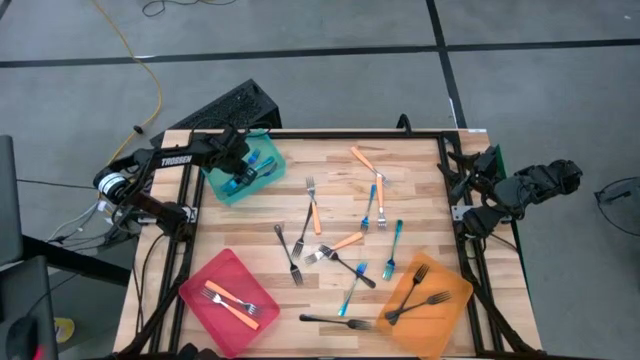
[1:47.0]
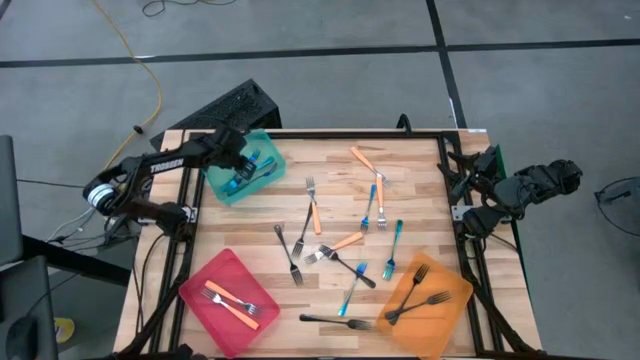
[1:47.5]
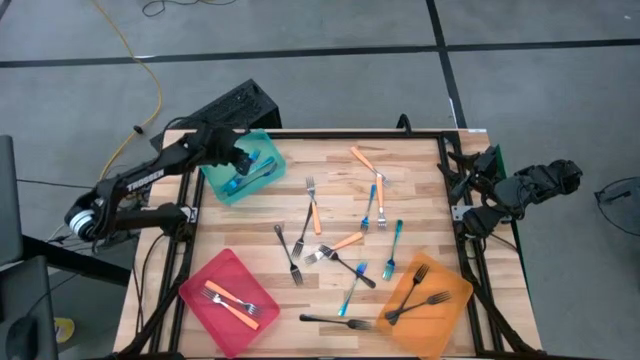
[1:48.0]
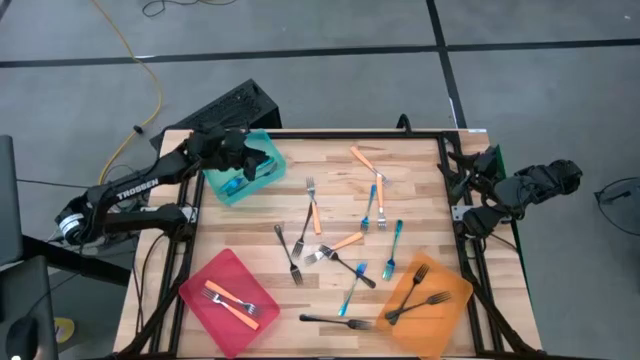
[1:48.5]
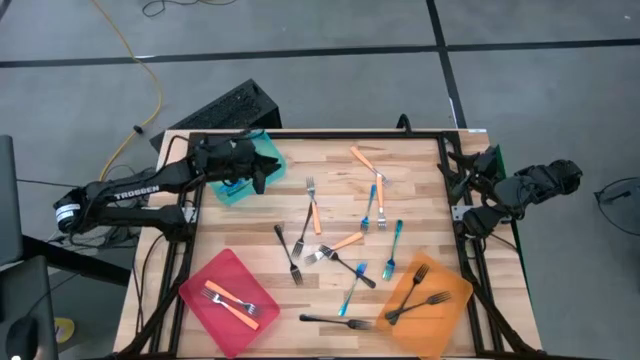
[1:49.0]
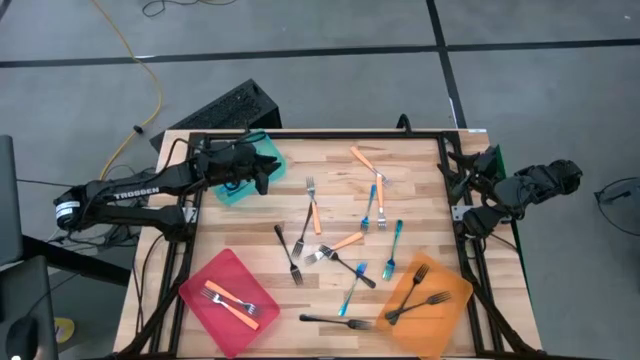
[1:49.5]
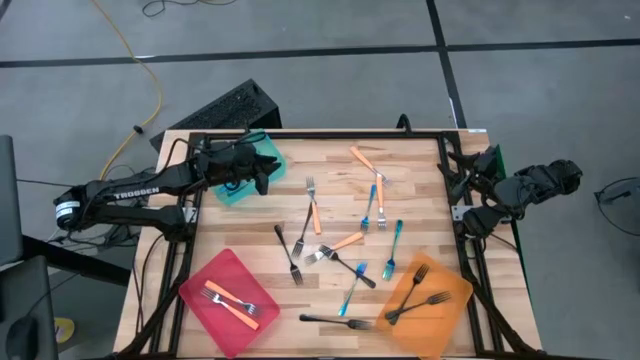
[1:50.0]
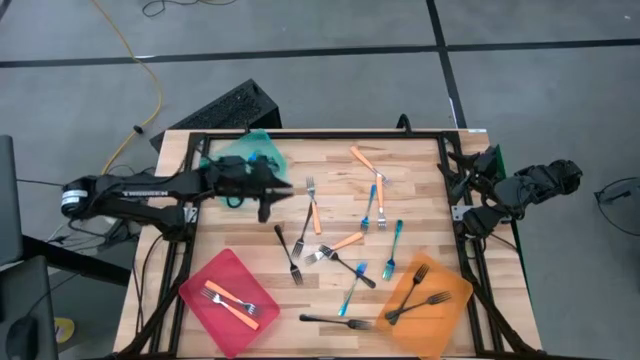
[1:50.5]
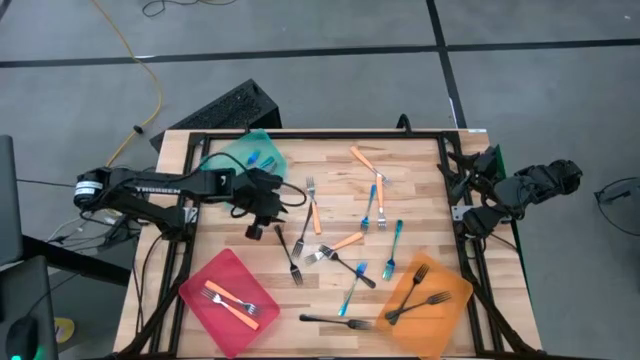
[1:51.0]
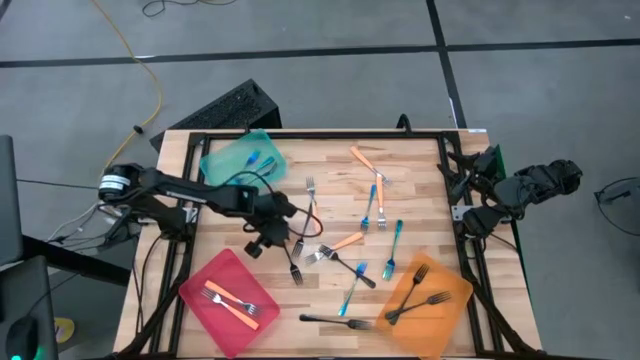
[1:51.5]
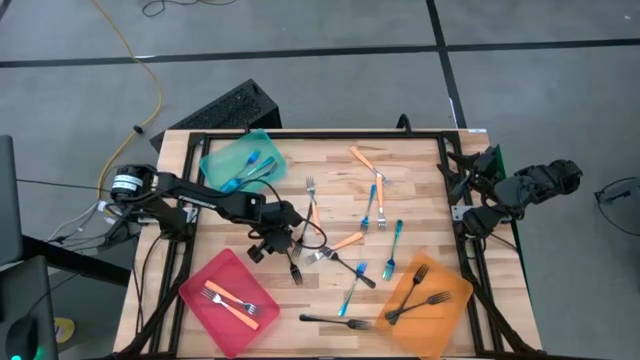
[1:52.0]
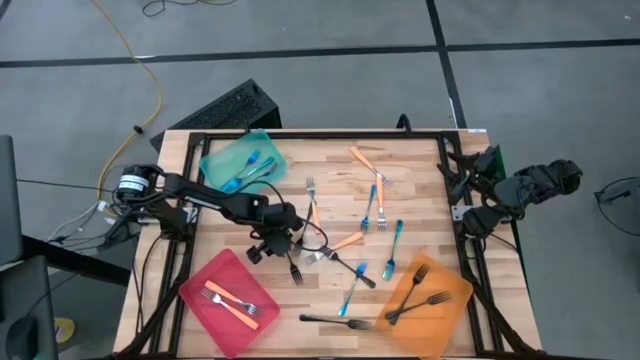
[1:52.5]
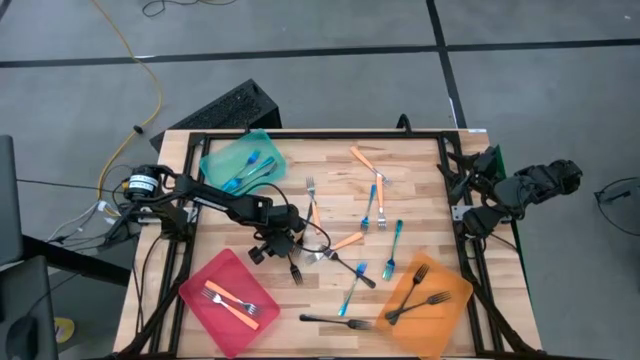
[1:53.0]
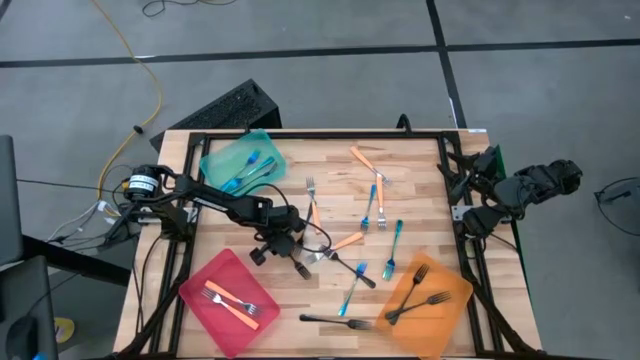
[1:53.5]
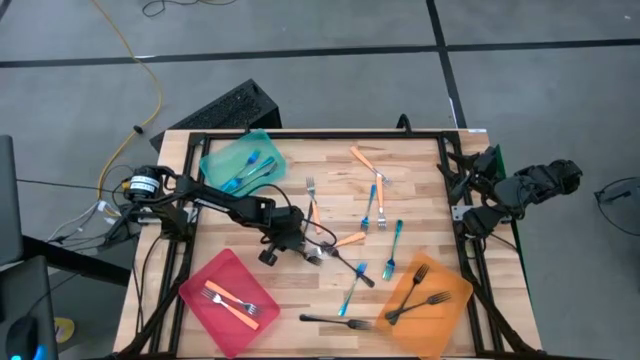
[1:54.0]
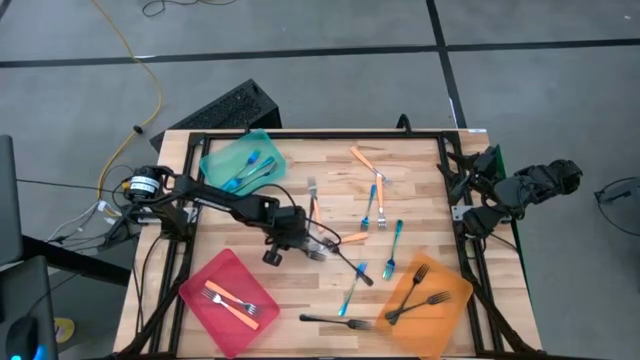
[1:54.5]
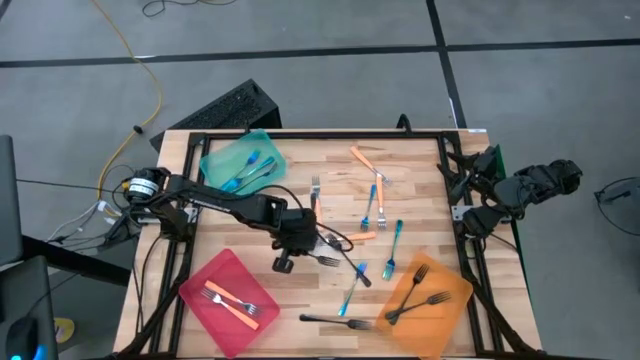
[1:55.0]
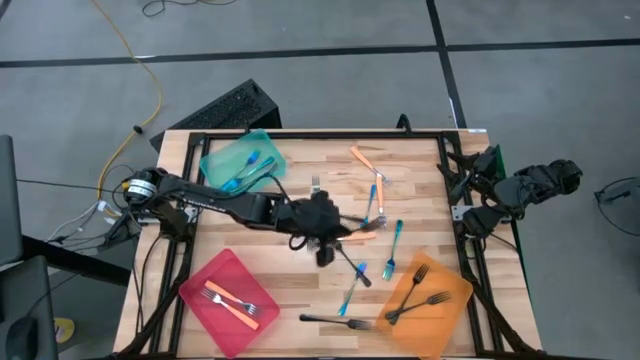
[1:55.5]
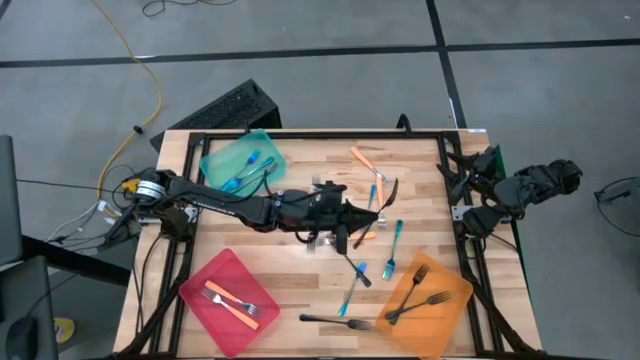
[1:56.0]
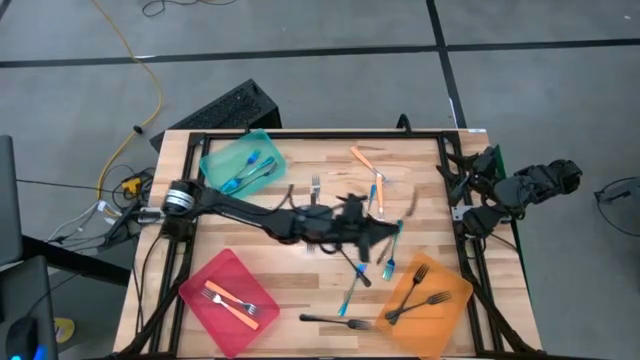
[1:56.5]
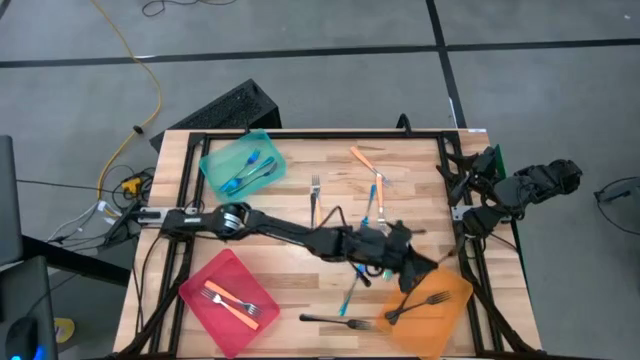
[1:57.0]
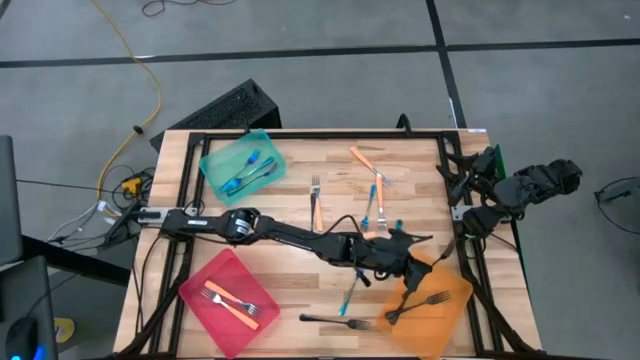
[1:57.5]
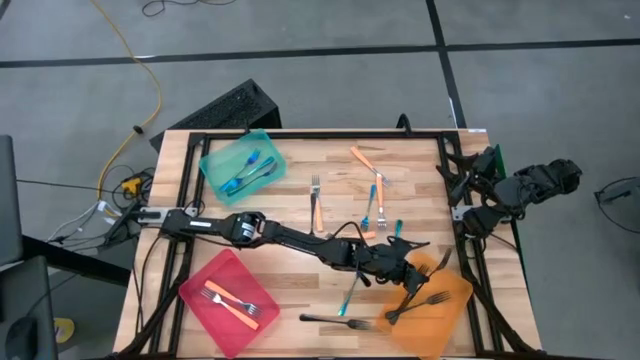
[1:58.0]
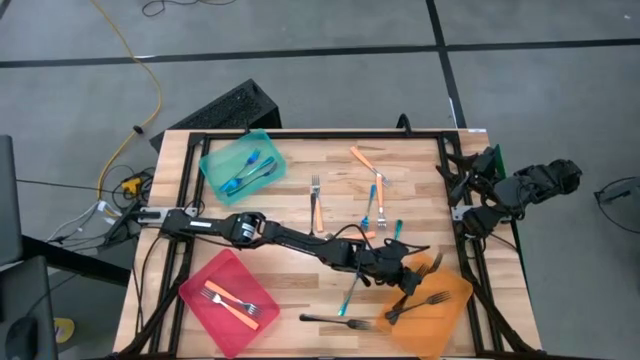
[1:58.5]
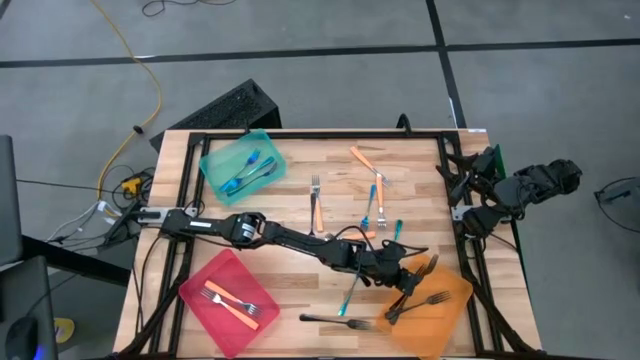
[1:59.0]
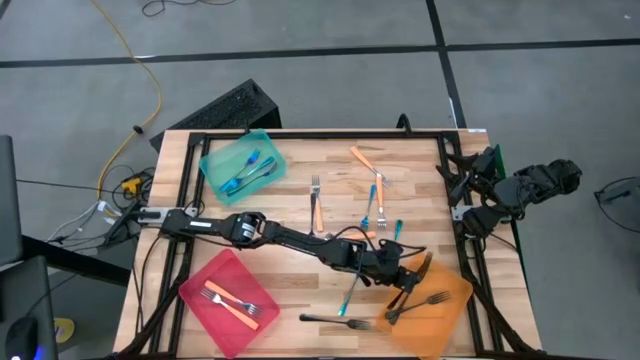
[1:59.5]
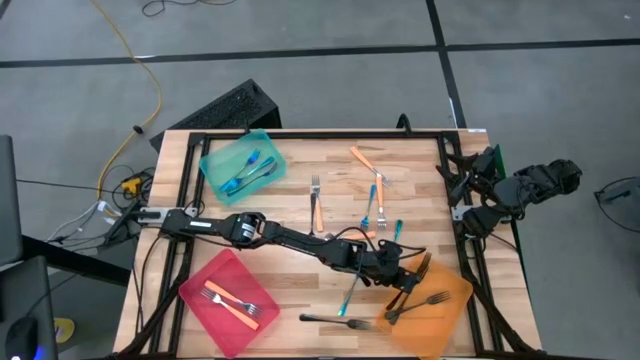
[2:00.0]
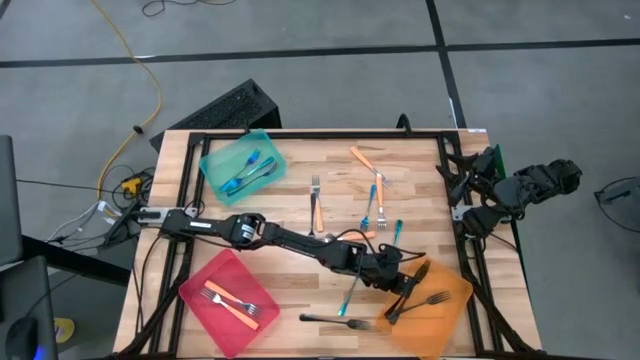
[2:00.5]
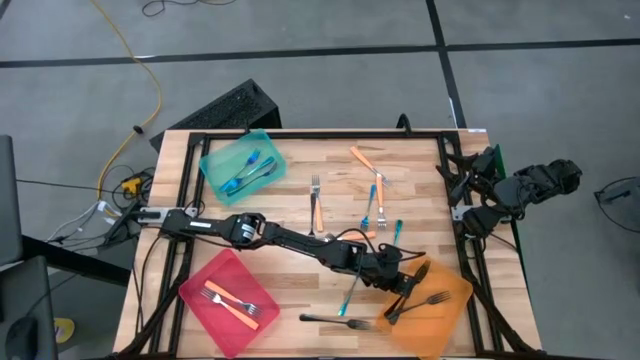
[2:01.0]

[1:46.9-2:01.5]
Task: Sort silverware by color (type)
Put the black fork into the orange bin

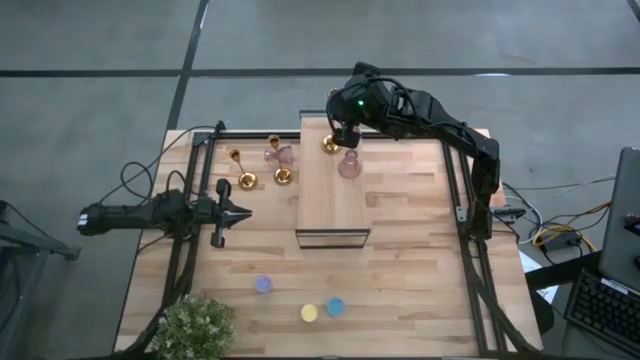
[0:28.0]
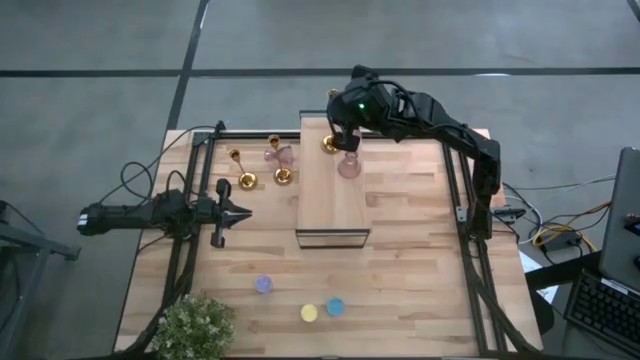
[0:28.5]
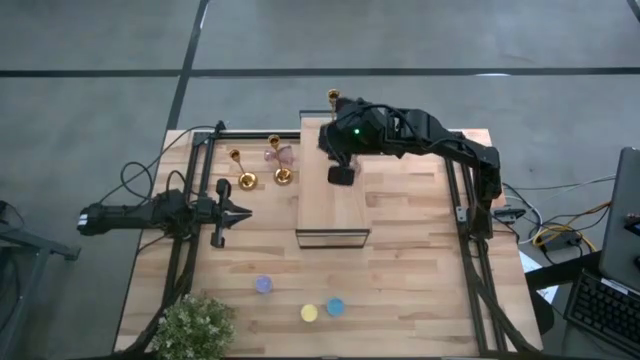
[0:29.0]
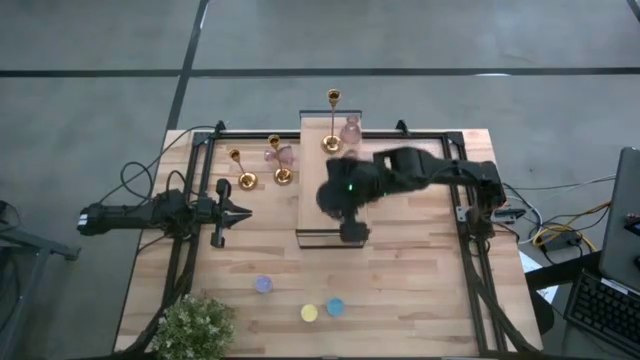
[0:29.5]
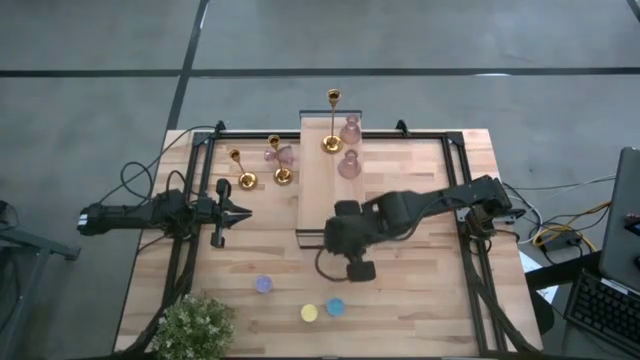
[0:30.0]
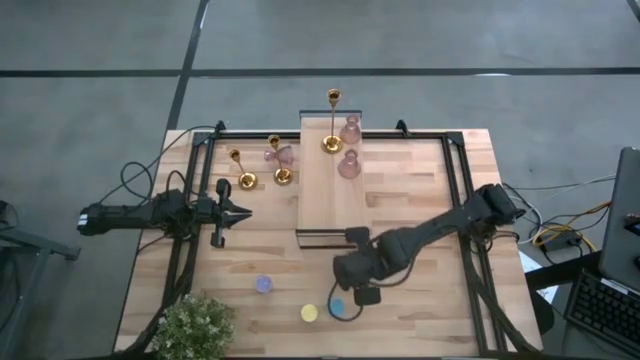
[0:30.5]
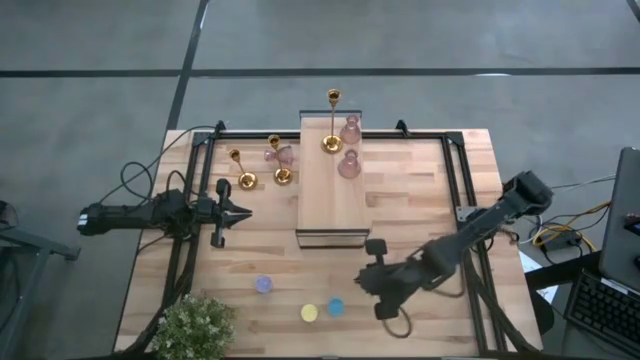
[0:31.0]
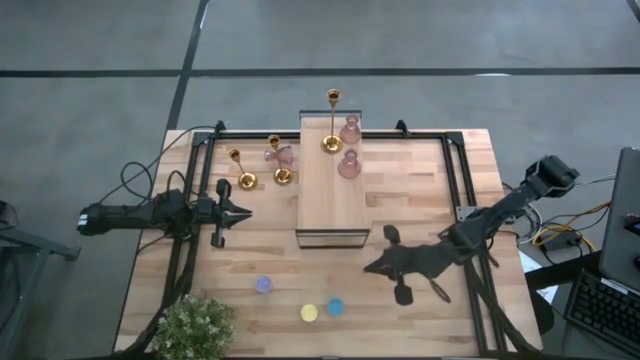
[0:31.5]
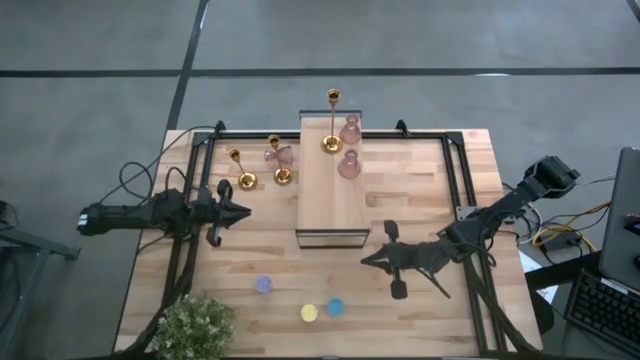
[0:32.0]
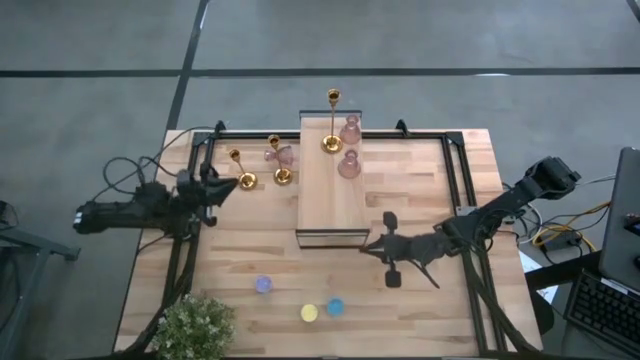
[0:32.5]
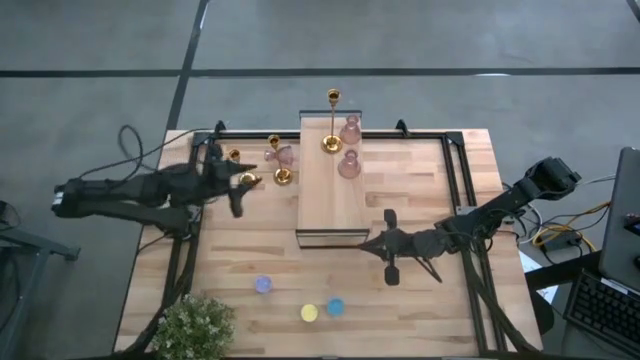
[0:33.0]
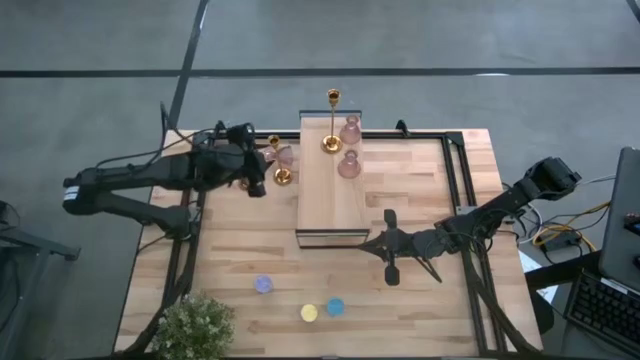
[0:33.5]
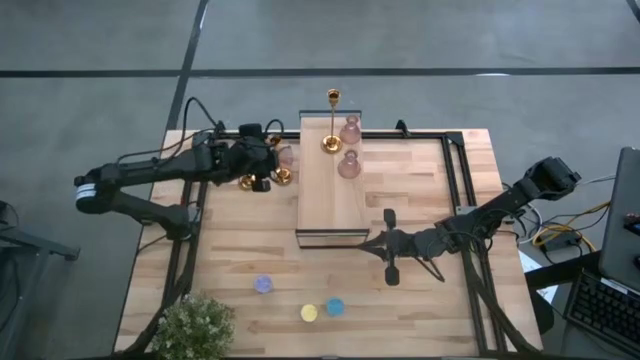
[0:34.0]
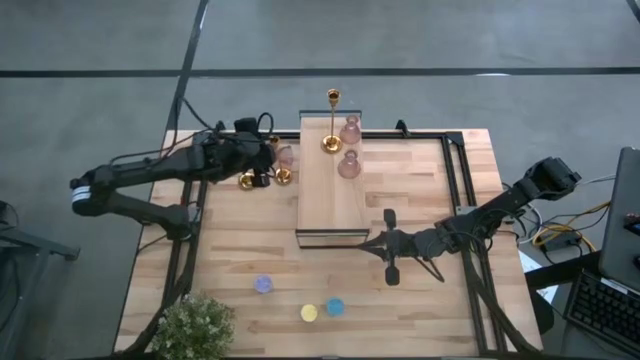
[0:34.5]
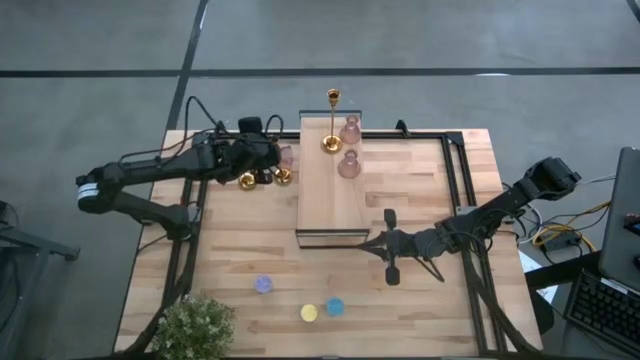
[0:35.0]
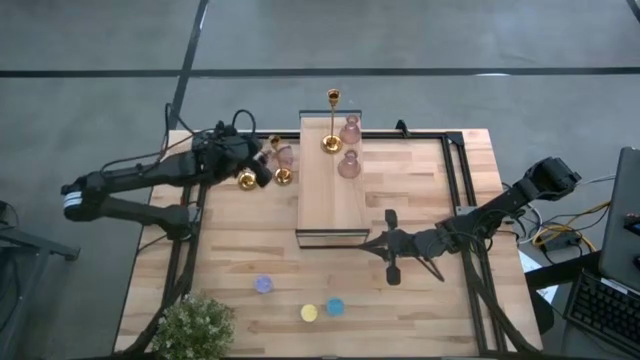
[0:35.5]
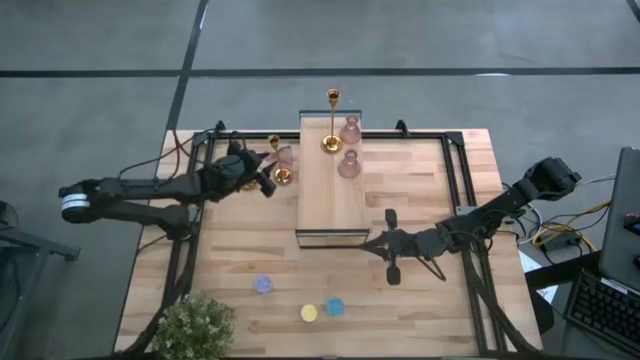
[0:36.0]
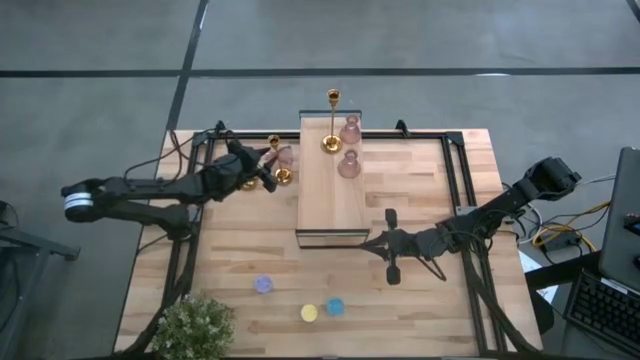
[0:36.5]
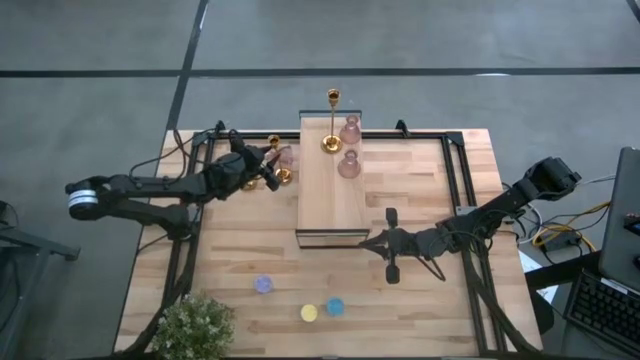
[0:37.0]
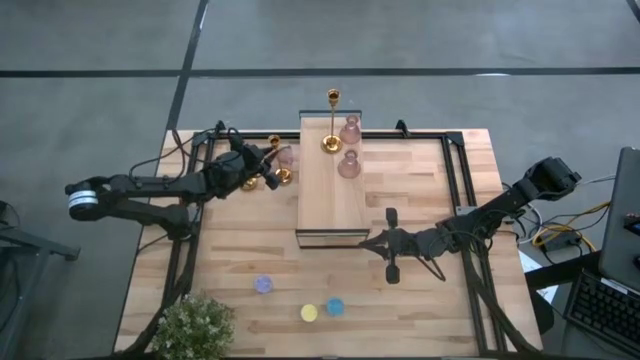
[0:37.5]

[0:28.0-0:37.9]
Task: Pick & Place candle stick holders
Put the right gold candlestick on the shelf
